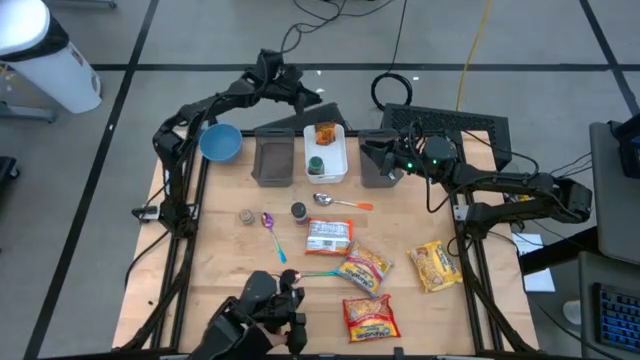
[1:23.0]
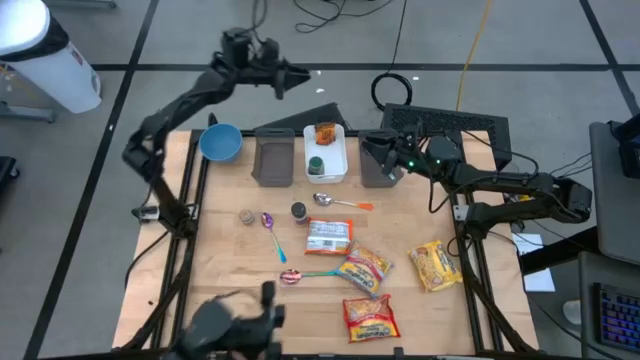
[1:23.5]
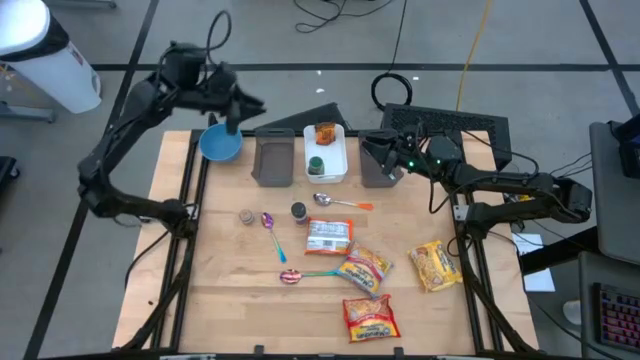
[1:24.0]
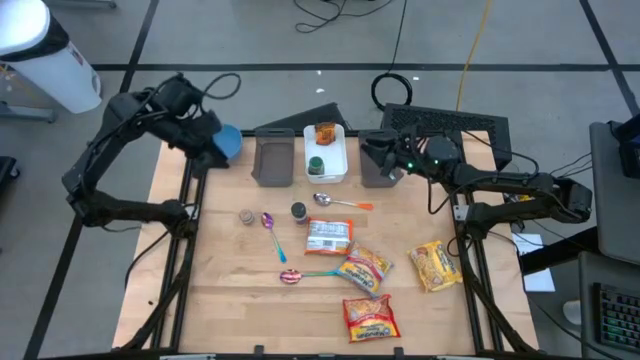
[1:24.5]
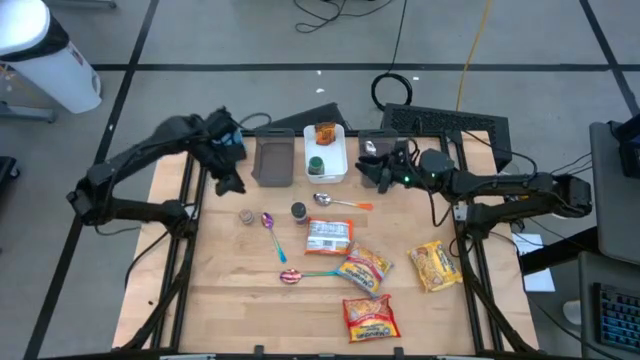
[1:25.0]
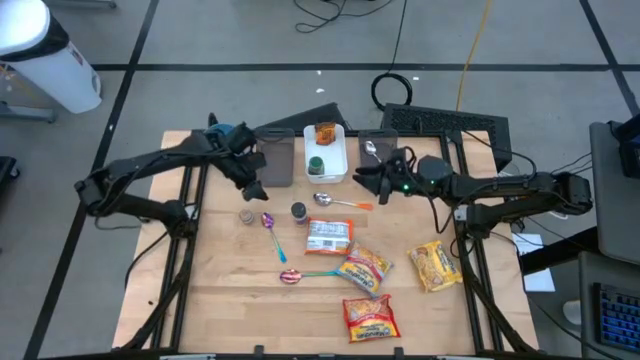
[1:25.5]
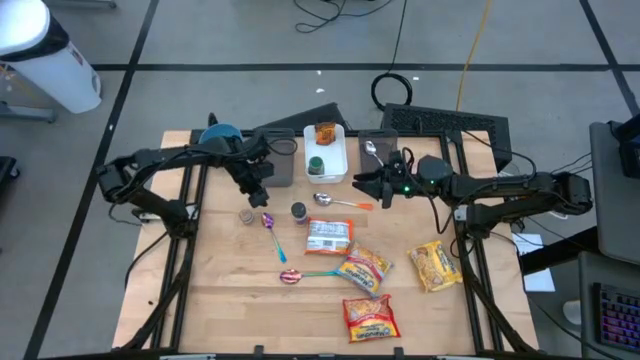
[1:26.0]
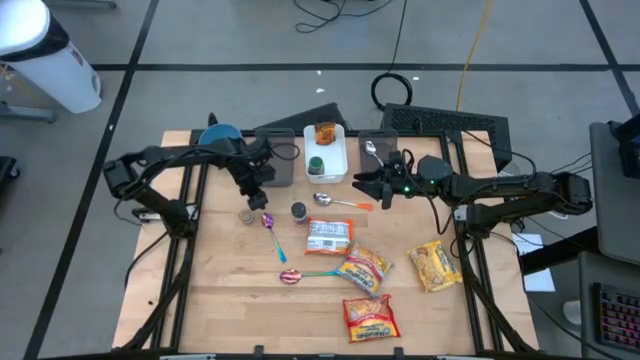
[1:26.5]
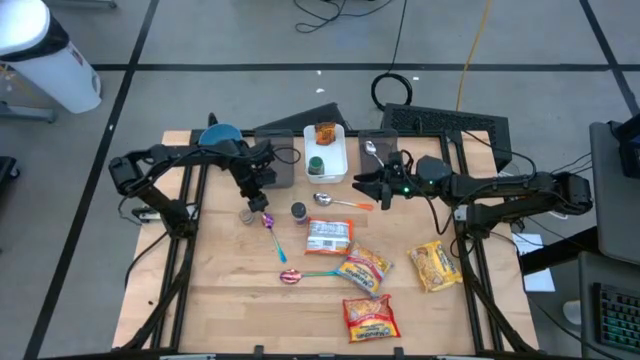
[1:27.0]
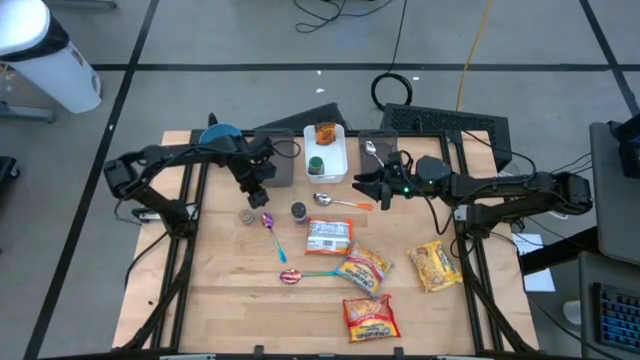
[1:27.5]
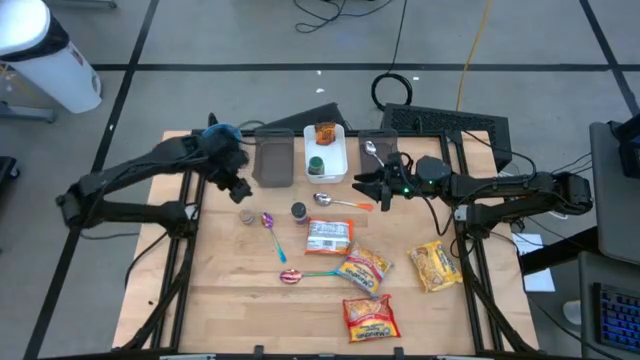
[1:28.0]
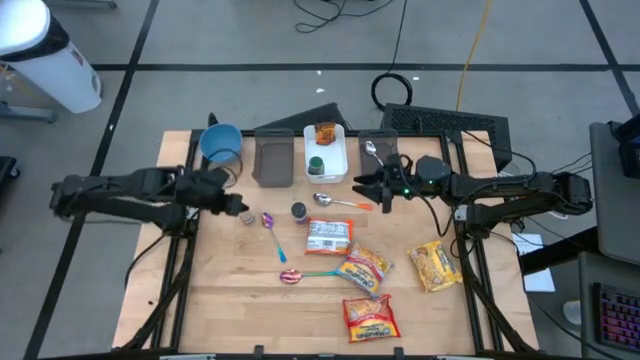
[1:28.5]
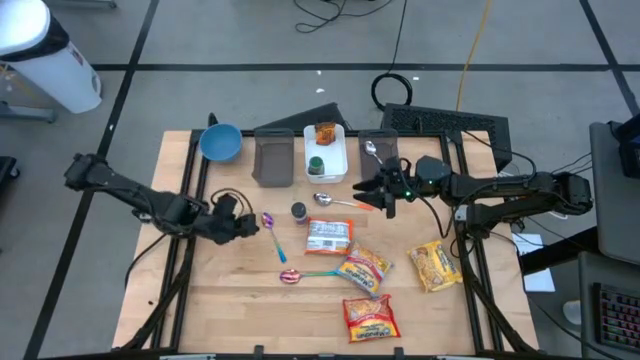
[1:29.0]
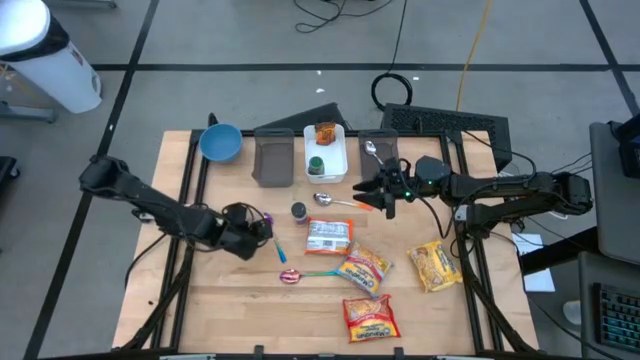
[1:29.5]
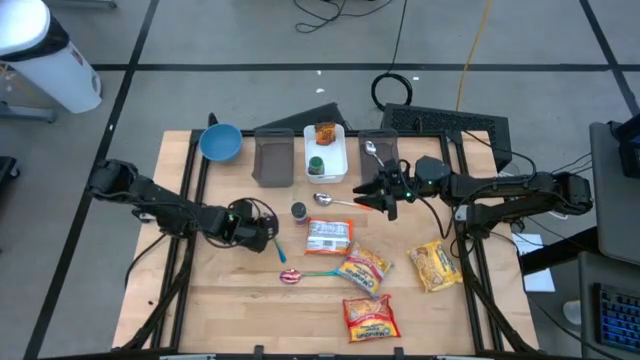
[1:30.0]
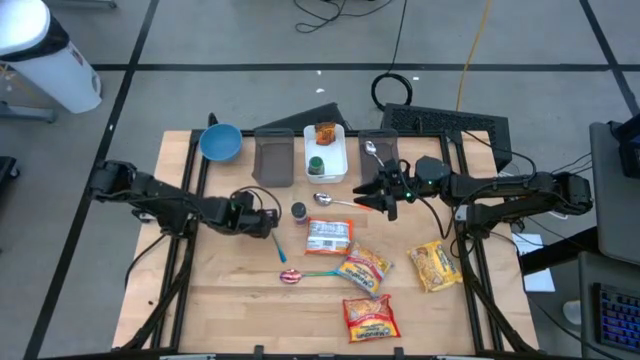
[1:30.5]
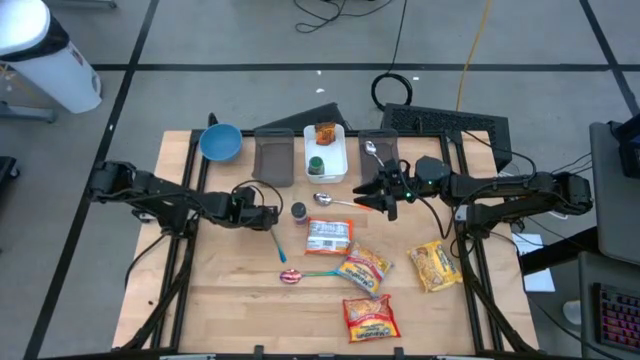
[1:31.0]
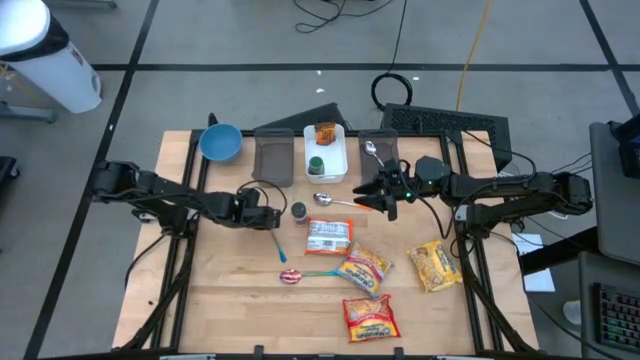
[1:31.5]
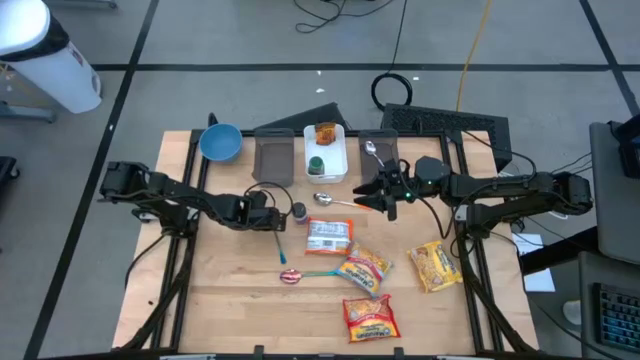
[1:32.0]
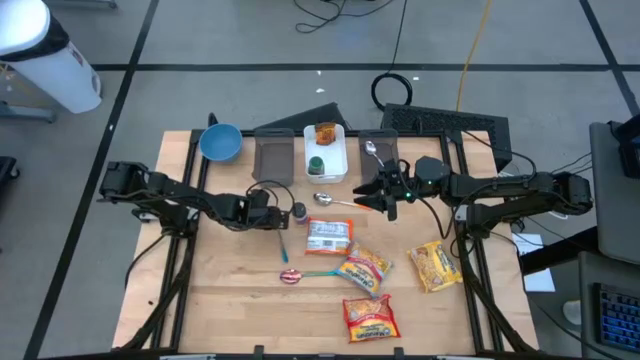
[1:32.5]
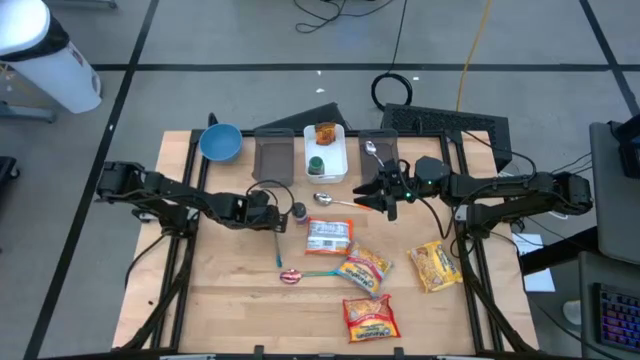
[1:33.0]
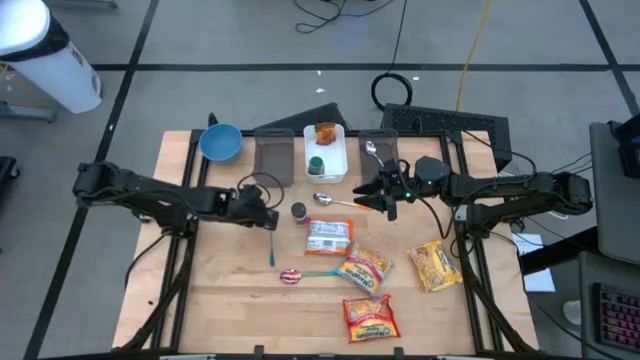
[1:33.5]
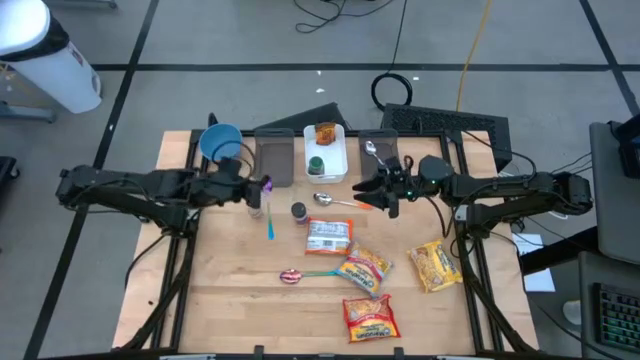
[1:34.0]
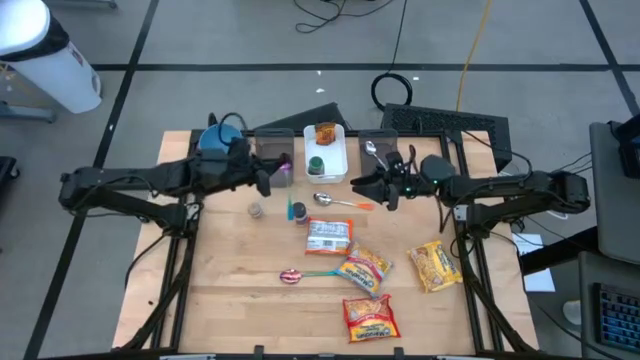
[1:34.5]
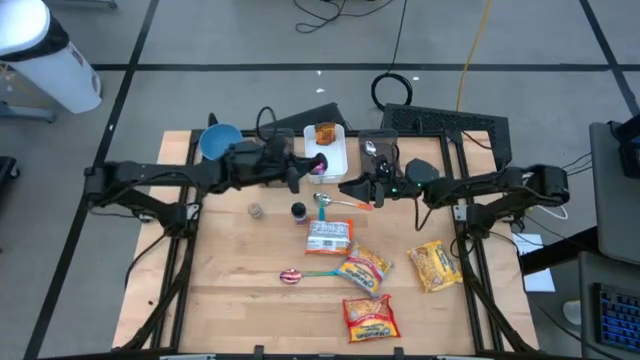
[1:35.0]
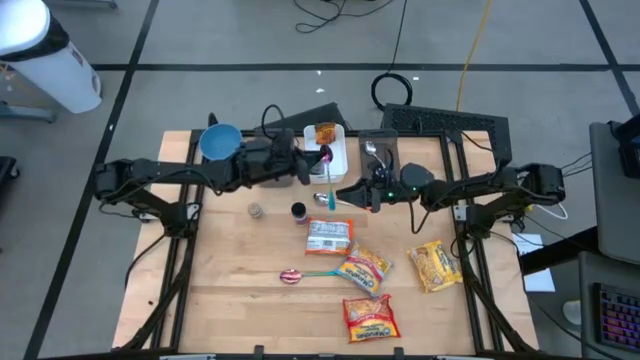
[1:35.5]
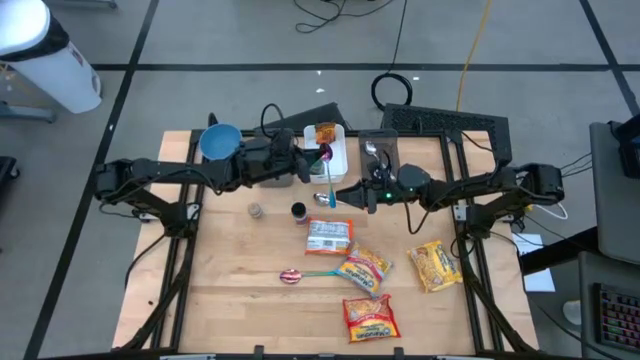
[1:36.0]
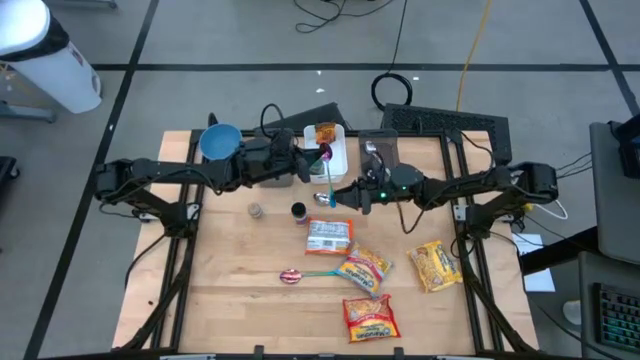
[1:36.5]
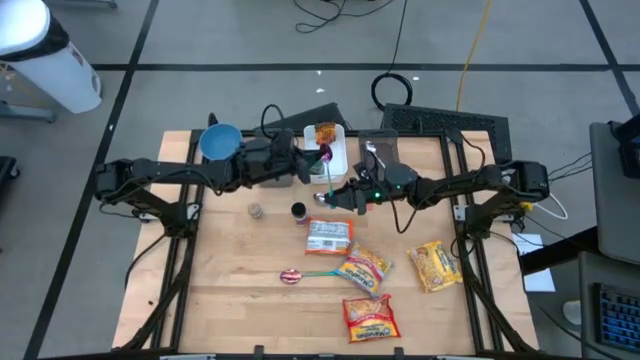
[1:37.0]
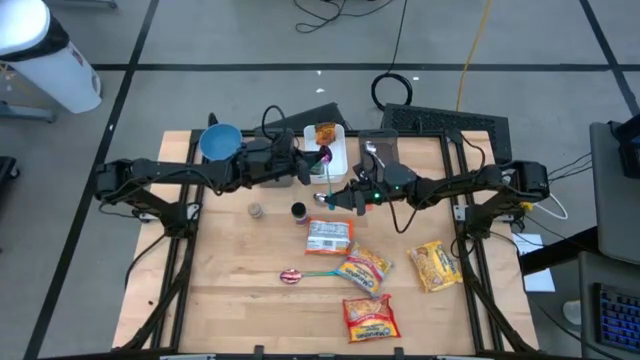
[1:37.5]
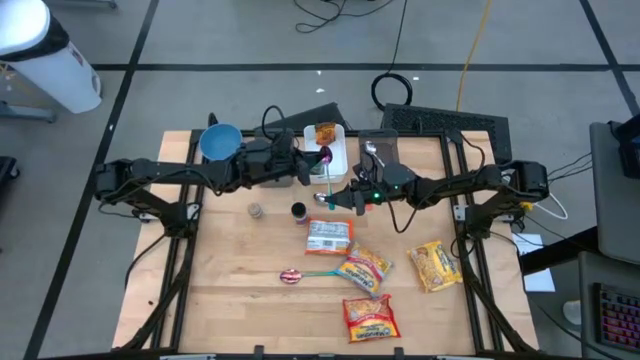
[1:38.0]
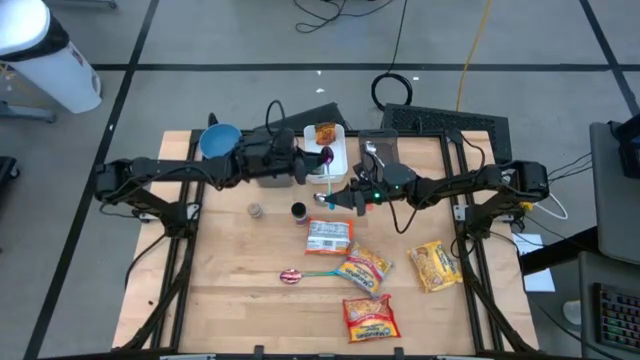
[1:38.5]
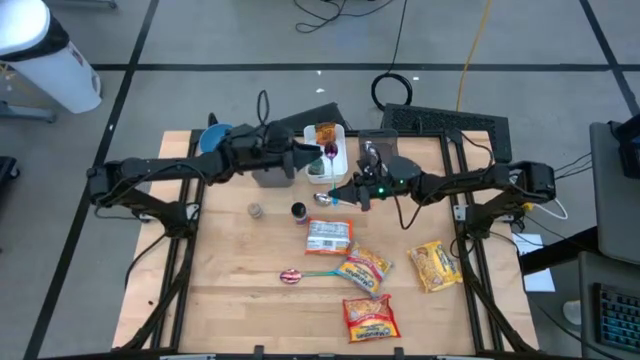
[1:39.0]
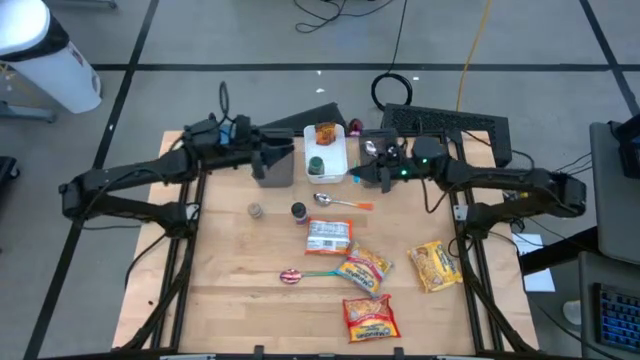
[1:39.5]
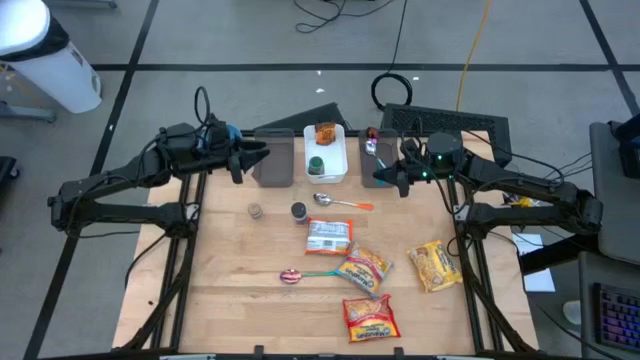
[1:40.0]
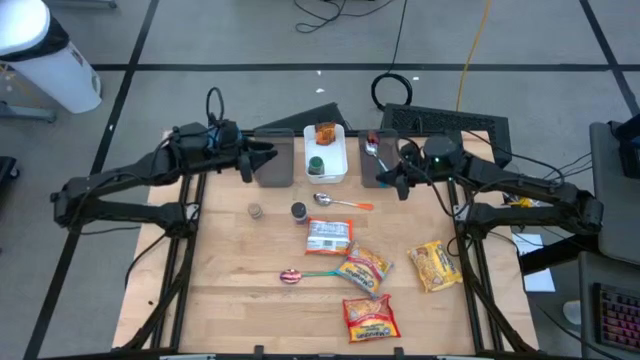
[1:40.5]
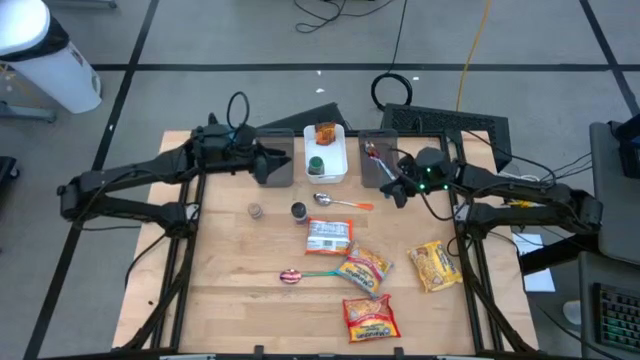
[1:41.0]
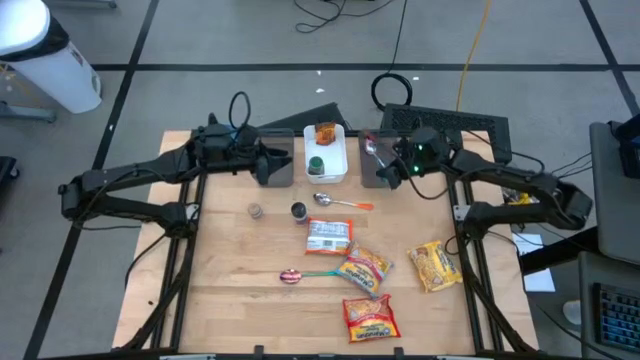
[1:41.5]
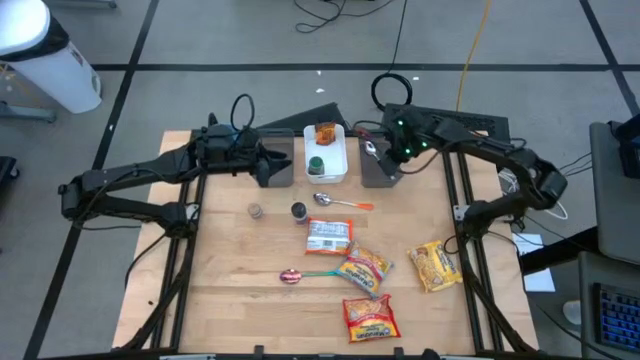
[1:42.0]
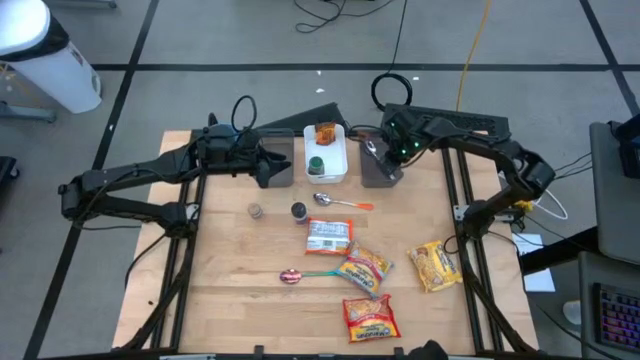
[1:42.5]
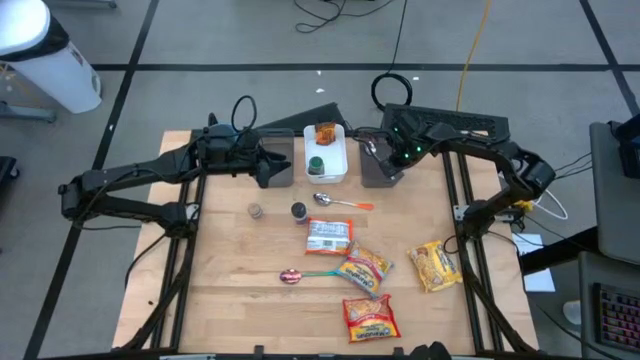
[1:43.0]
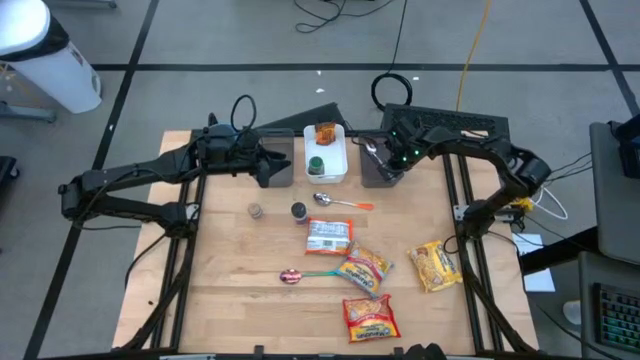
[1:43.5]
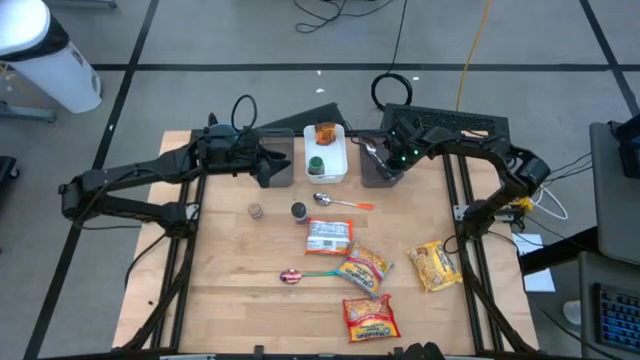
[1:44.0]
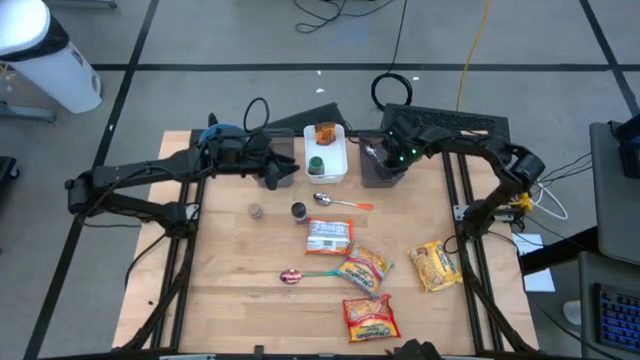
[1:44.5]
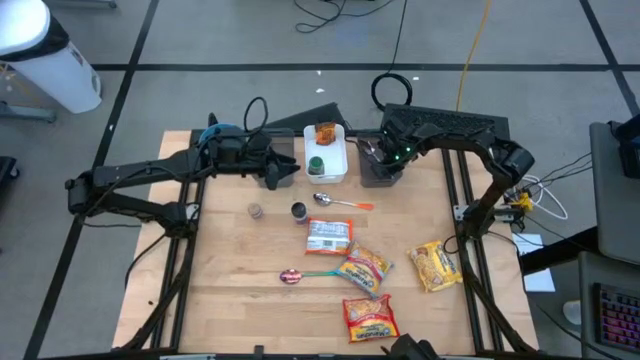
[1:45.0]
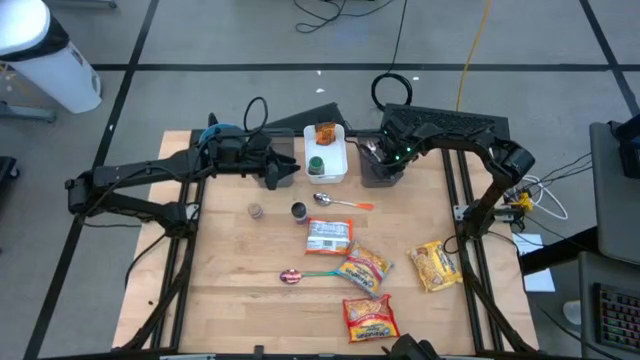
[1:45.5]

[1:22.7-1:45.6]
Task: Pick & Place Food Item
Put the rainbow spoon into the right black bin
